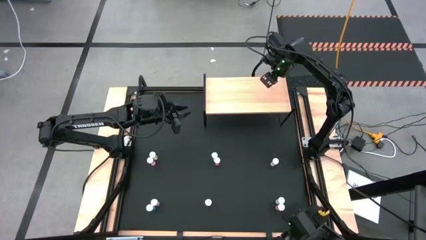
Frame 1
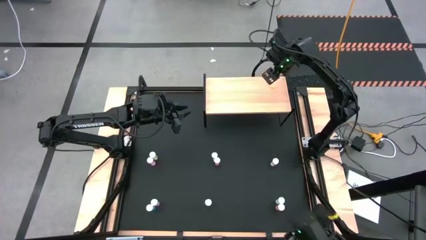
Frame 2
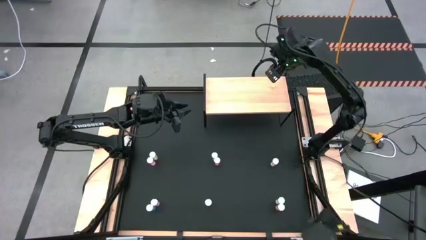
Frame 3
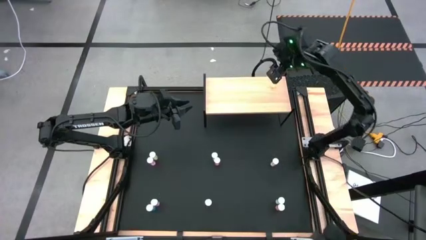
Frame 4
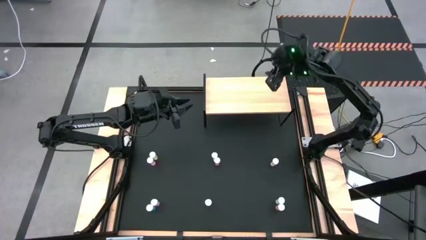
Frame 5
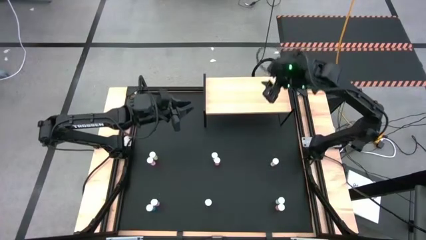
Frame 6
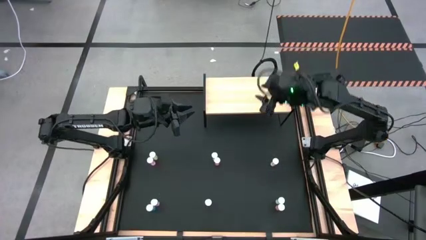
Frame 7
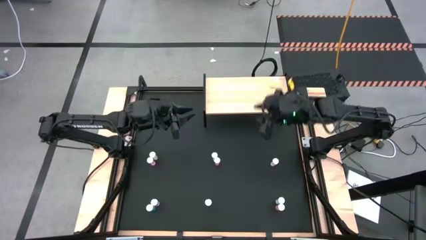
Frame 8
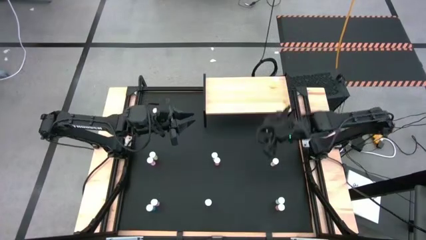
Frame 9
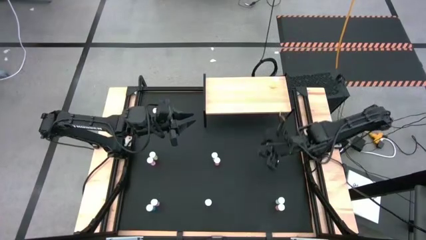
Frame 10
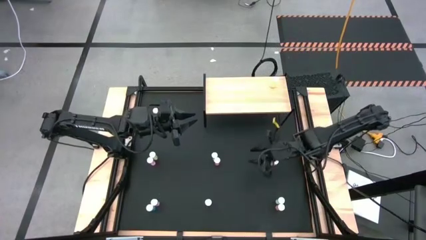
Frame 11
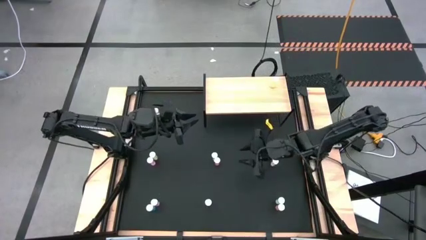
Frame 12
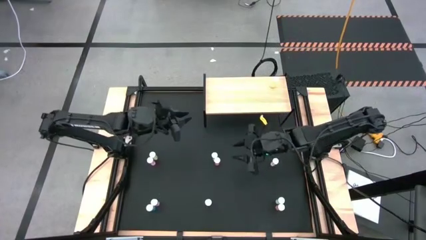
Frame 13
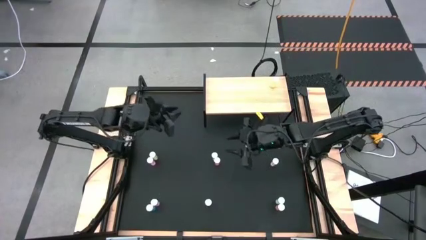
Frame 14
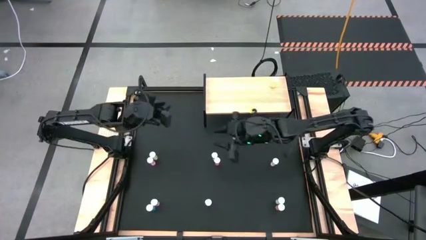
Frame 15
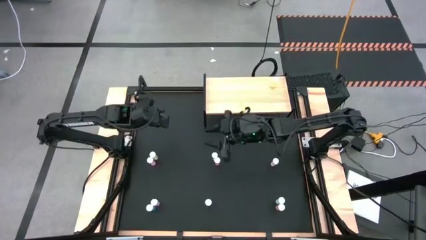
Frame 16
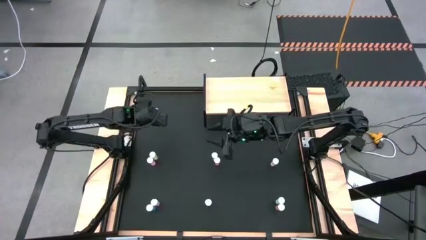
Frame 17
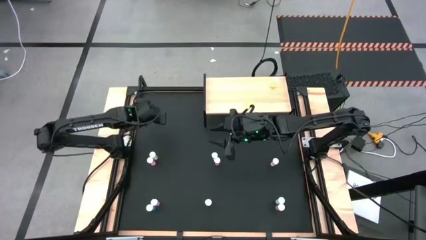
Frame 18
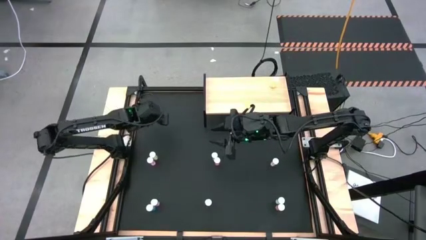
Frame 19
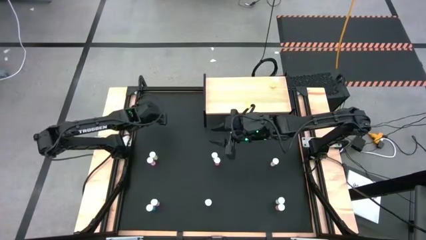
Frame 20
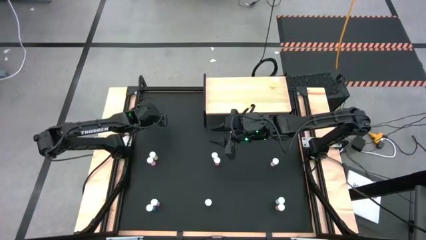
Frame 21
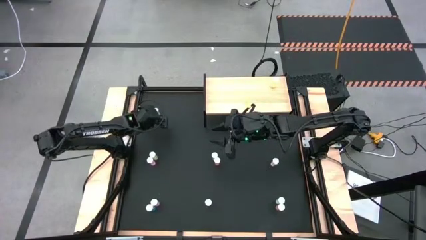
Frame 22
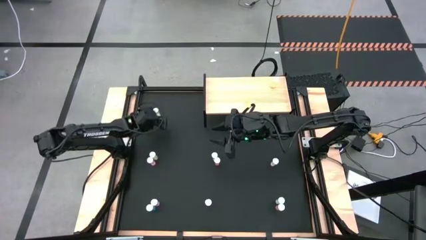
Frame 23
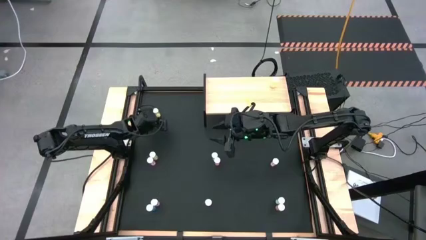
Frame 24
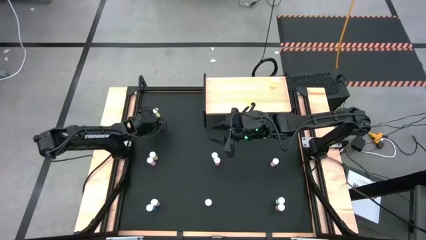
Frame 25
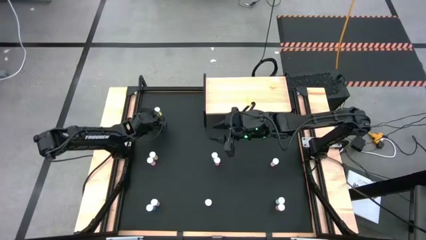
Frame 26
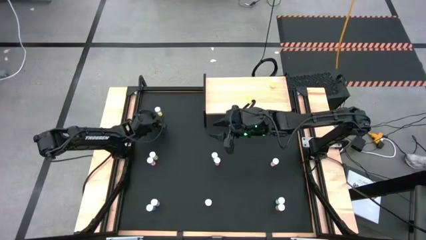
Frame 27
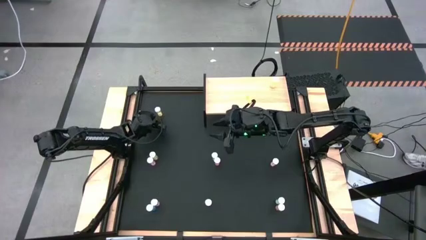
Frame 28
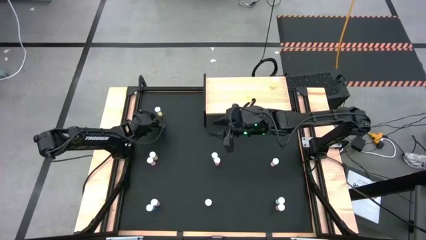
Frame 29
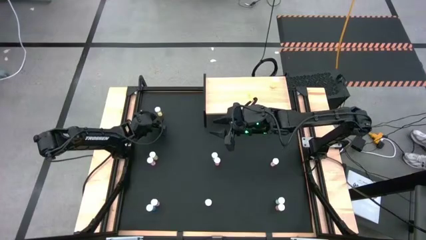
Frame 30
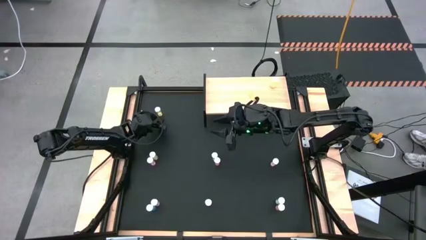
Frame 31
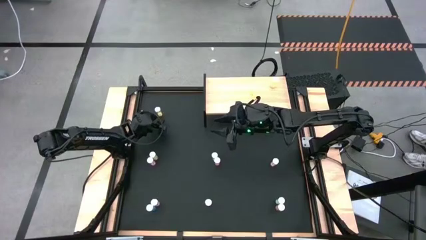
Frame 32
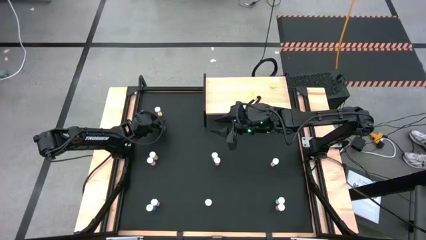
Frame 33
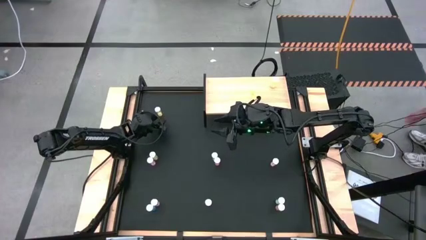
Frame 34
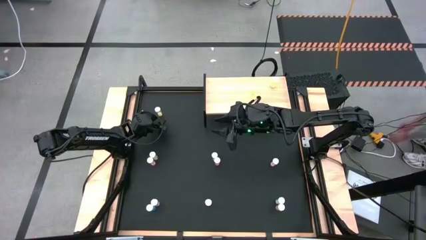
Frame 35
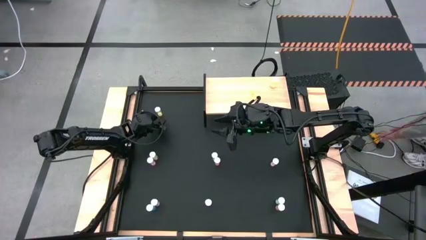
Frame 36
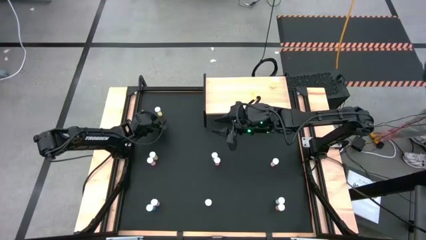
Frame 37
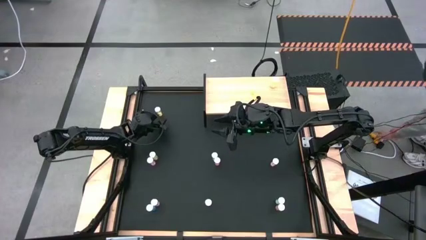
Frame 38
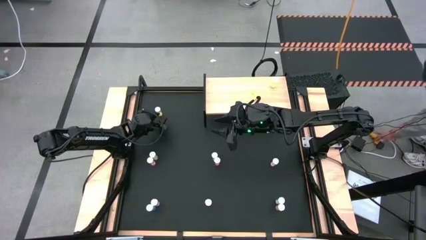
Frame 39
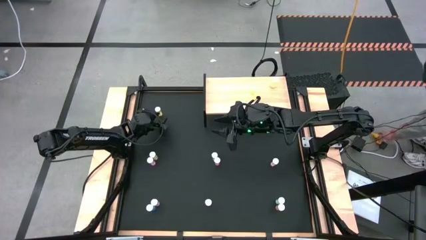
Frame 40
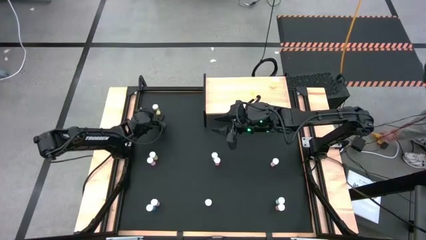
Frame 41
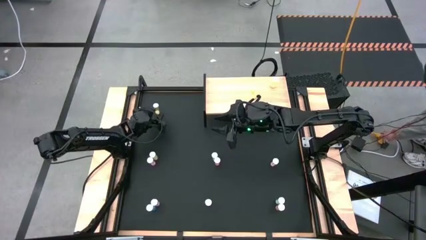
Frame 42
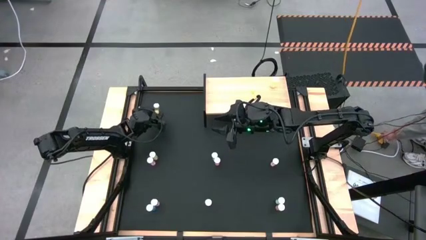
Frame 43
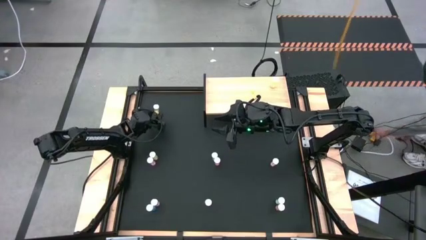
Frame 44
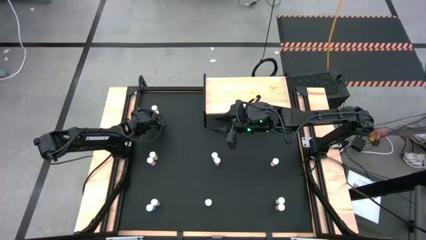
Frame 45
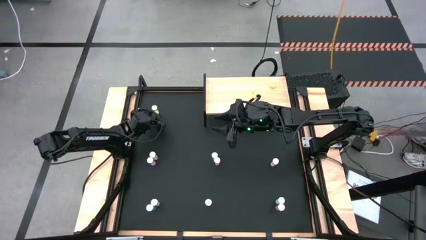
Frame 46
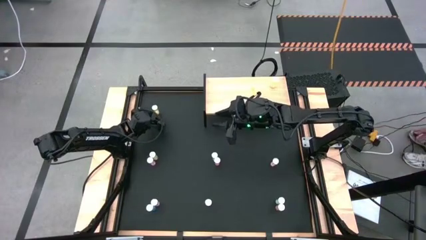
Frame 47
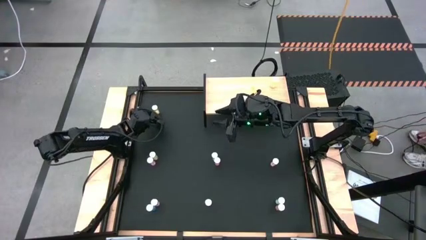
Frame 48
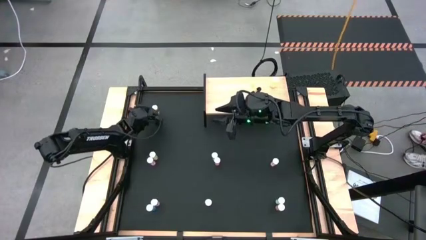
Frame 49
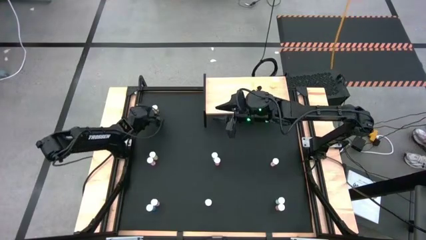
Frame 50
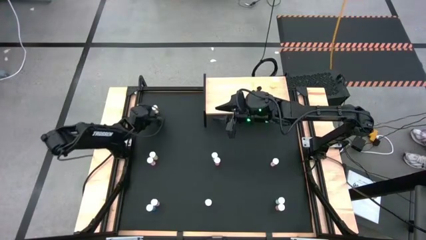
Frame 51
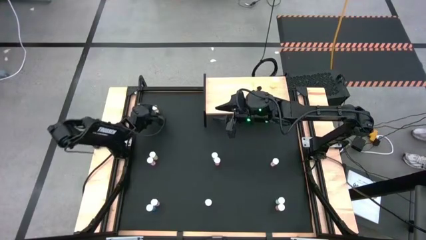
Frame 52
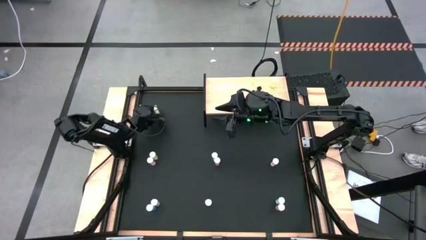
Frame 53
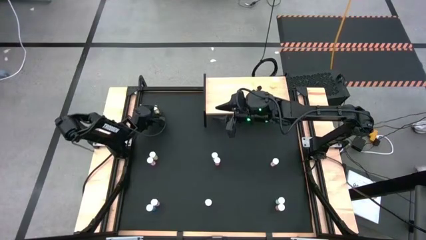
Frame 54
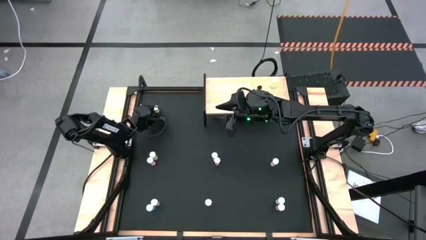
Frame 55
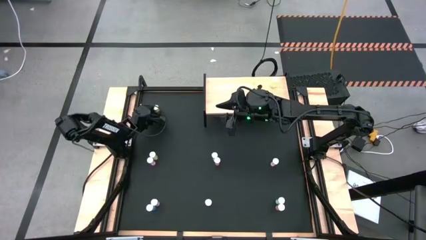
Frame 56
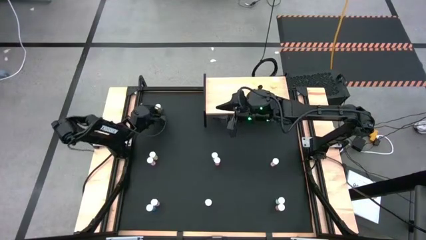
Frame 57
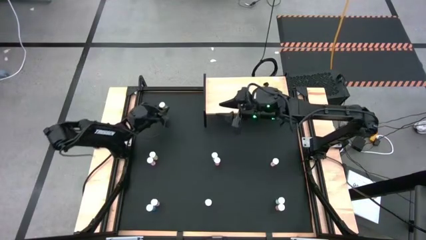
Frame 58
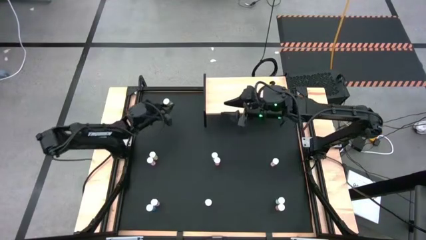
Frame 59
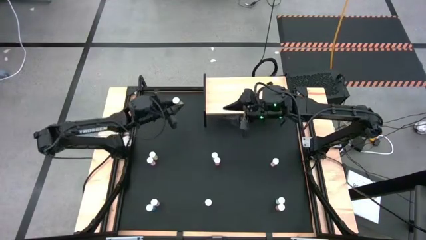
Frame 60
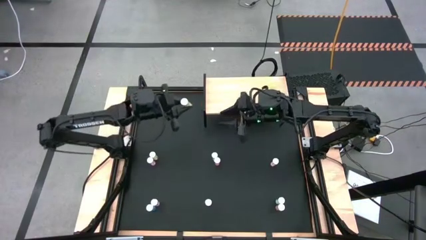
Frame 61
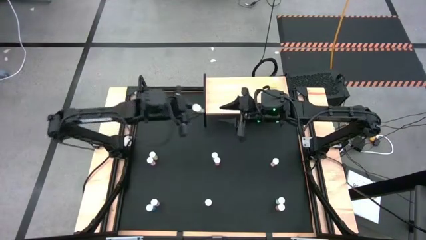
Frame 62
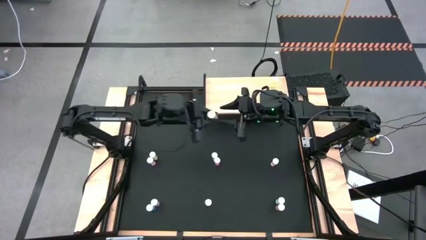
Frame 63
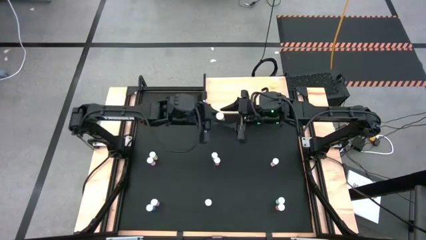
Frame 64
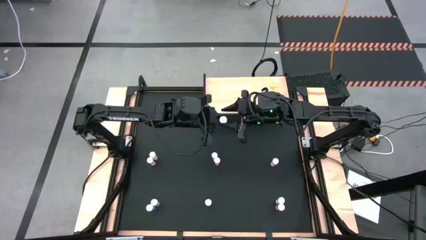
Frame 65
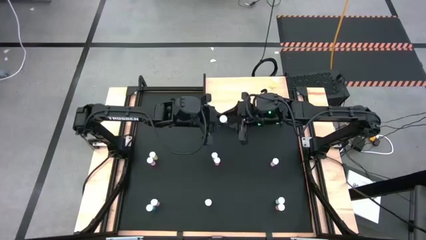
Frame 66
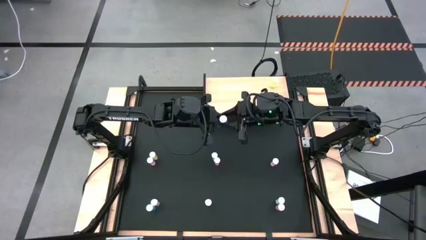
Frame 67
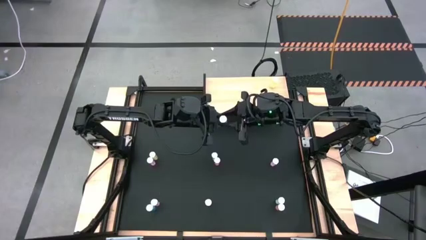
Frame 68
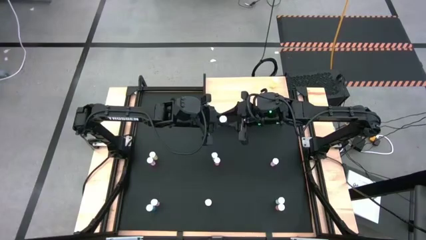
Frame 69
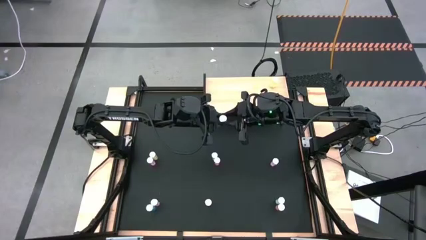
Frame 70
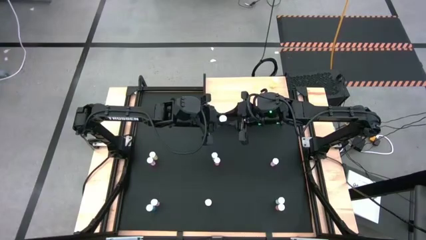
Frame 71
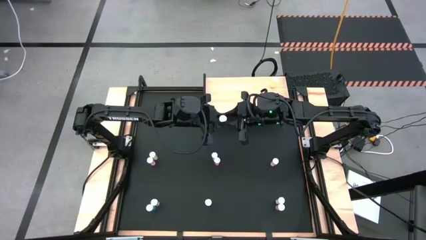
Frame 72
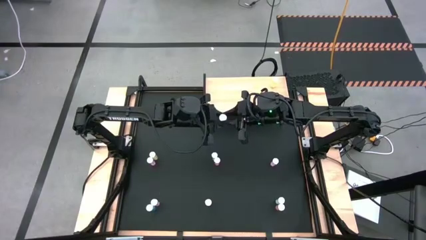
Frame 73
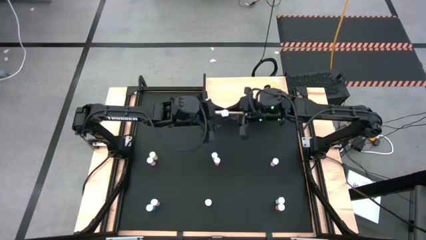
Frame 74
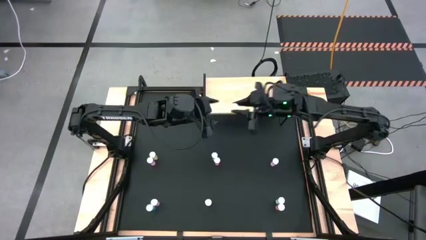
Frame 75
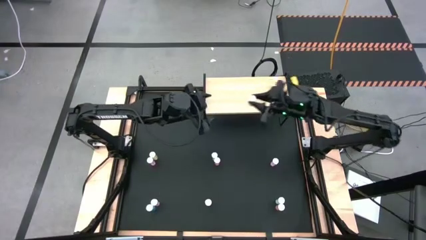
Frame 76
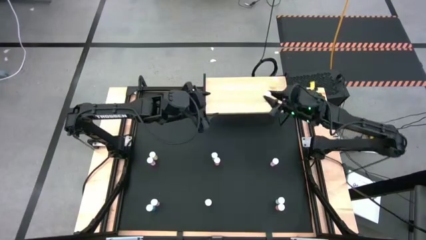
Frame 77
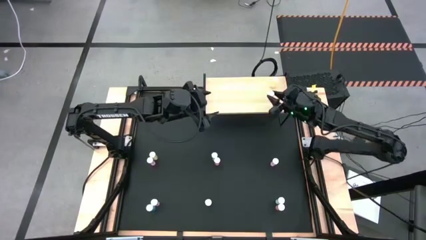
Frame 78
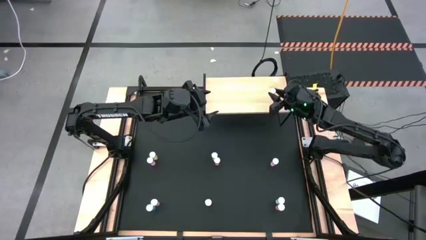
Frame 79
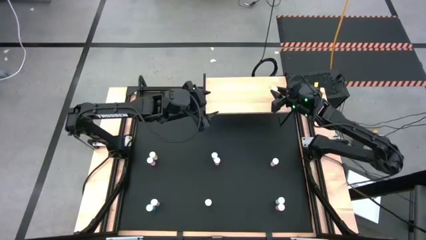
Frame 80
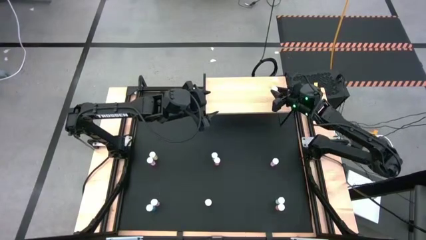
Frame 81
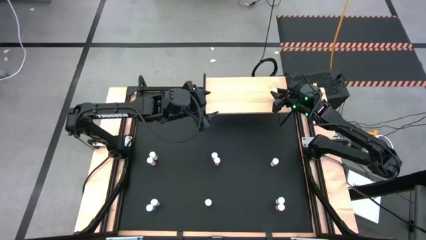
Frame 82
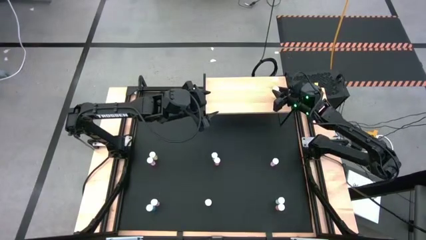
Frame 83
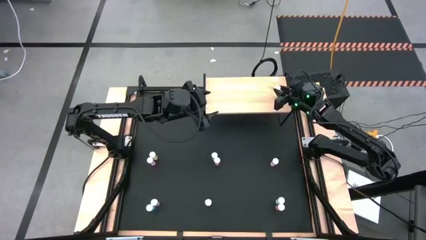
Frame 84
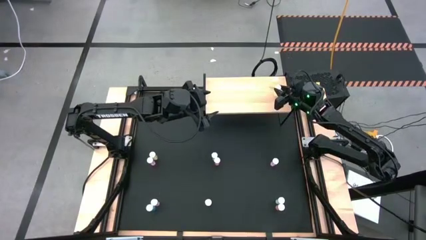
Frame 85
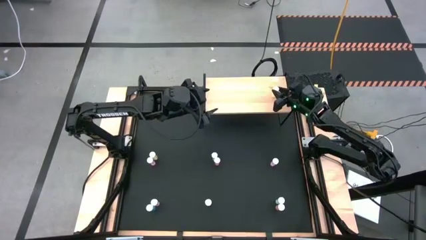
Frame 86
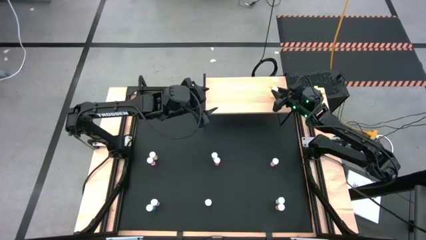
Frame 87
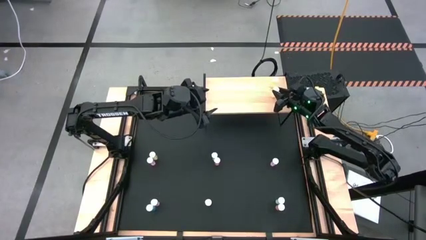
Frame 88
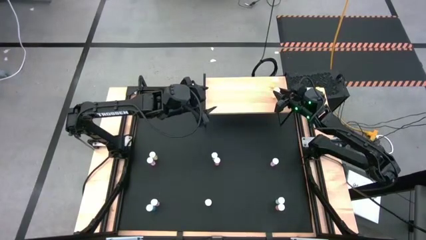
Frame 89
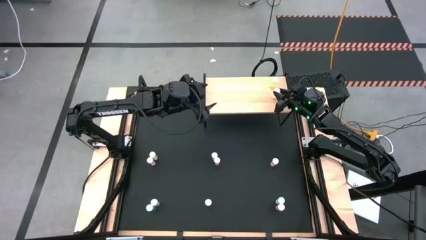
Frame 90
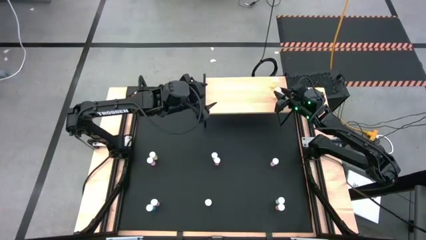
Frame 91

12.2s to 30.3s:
Task: Pick and place medicine bottles onto shelf by color
Put the top yellow pill bottle on the shelf aligned with the other yellow pill bottle
